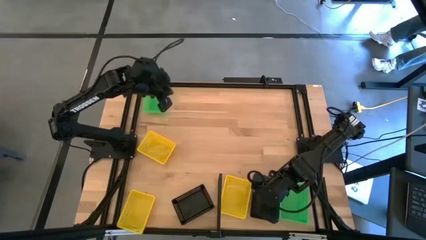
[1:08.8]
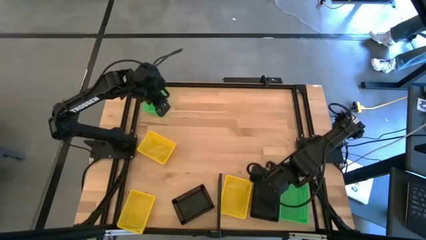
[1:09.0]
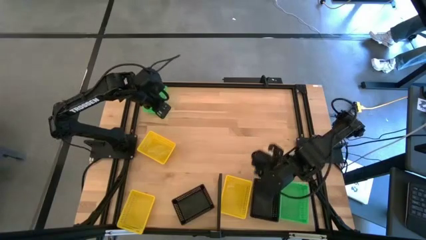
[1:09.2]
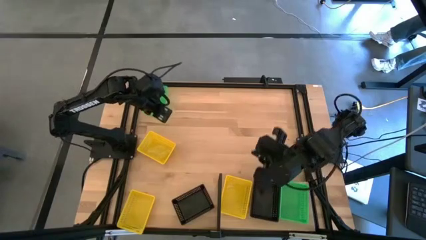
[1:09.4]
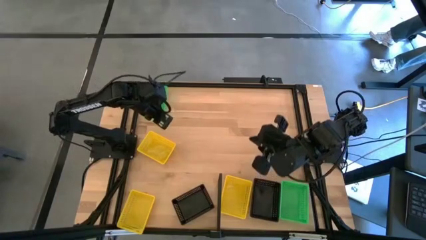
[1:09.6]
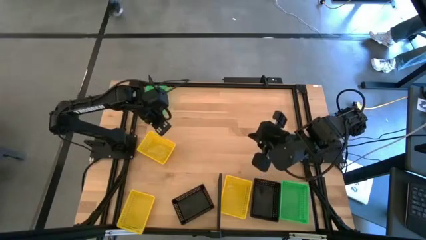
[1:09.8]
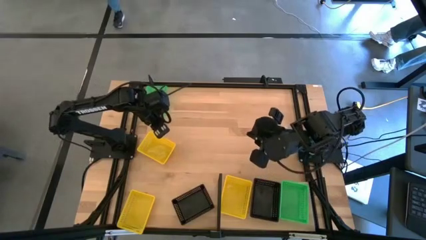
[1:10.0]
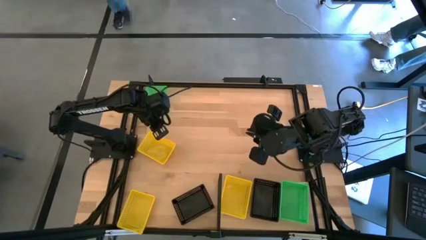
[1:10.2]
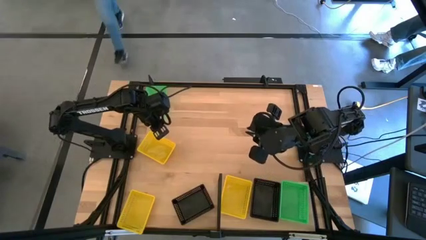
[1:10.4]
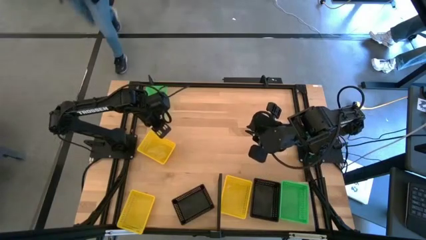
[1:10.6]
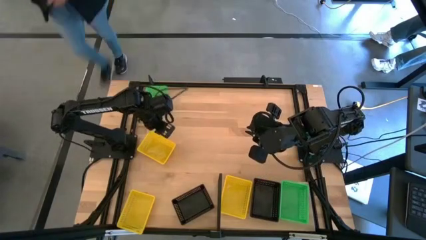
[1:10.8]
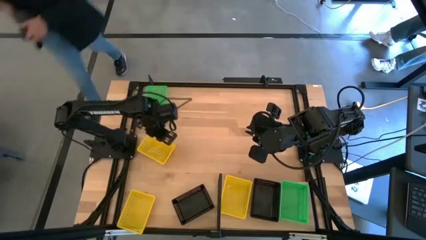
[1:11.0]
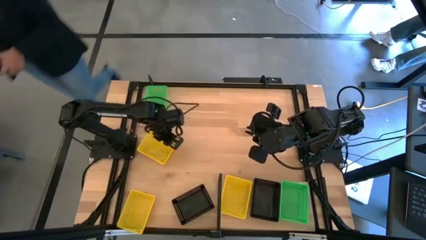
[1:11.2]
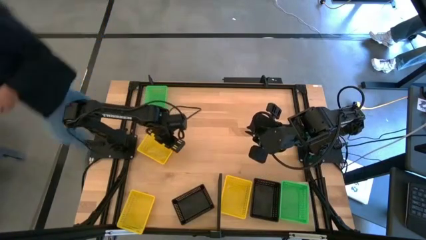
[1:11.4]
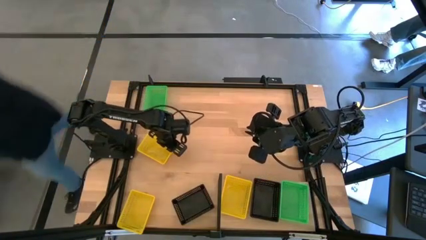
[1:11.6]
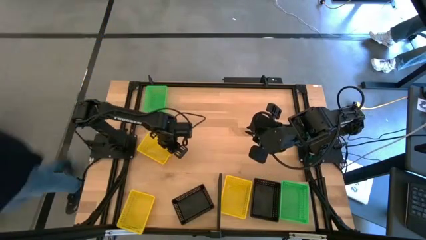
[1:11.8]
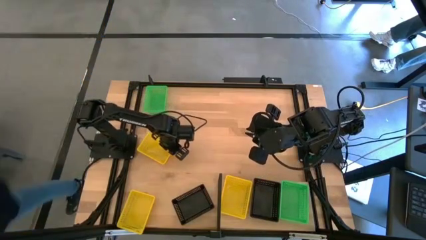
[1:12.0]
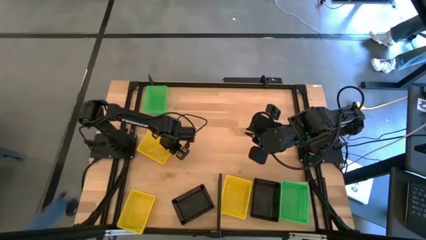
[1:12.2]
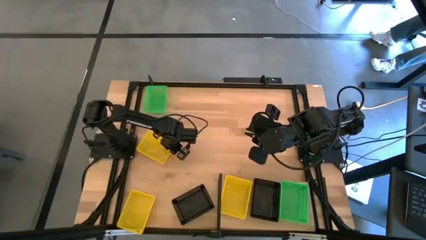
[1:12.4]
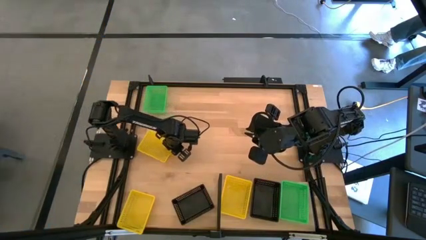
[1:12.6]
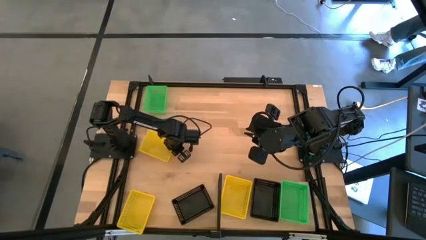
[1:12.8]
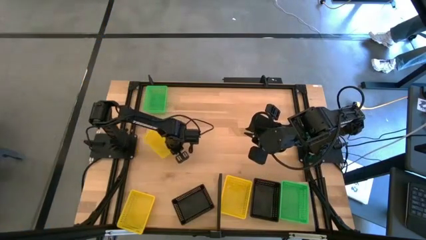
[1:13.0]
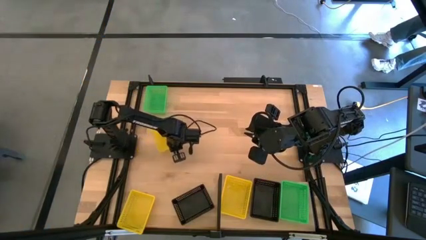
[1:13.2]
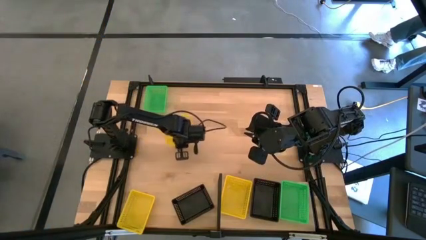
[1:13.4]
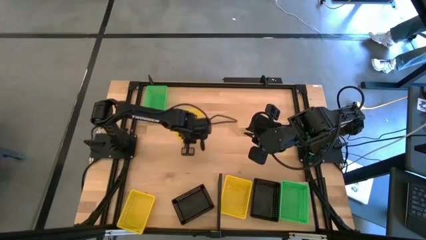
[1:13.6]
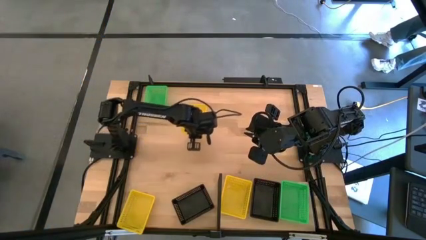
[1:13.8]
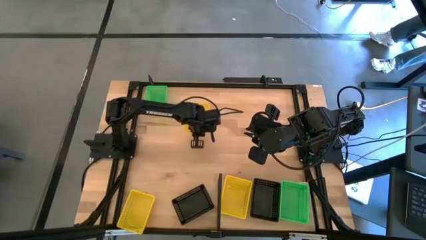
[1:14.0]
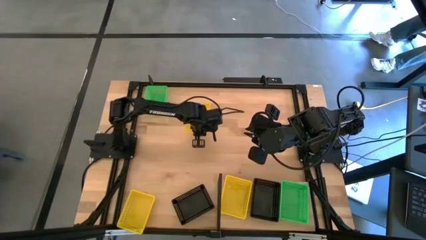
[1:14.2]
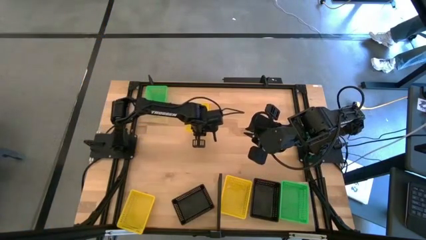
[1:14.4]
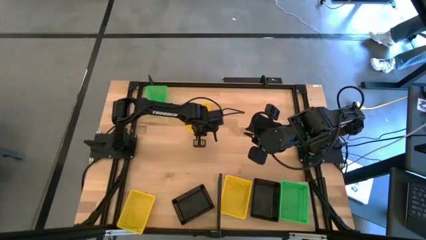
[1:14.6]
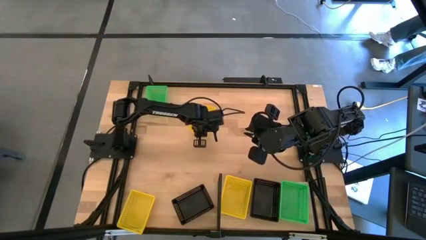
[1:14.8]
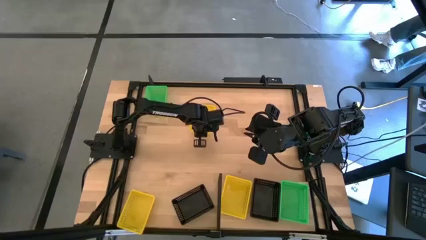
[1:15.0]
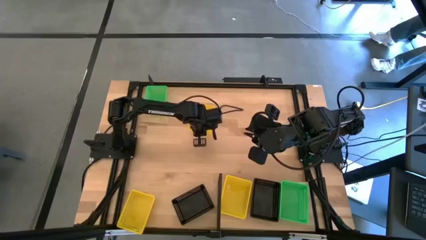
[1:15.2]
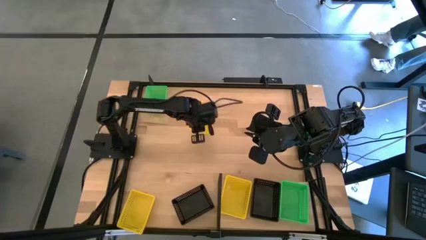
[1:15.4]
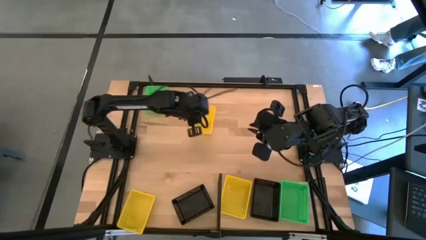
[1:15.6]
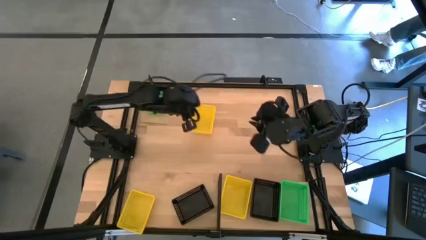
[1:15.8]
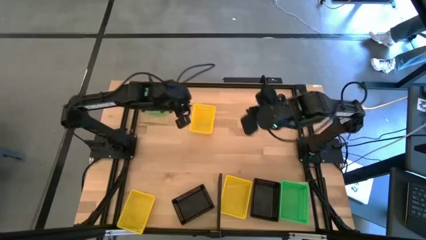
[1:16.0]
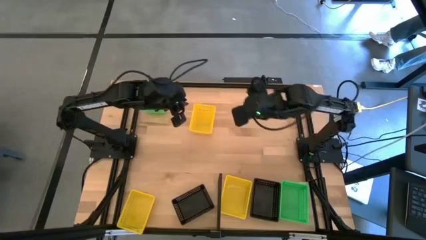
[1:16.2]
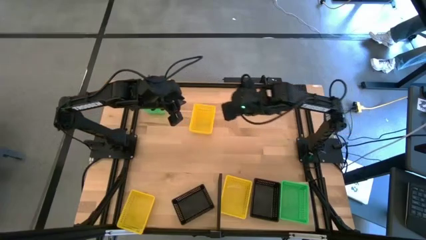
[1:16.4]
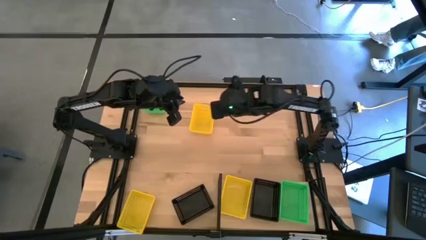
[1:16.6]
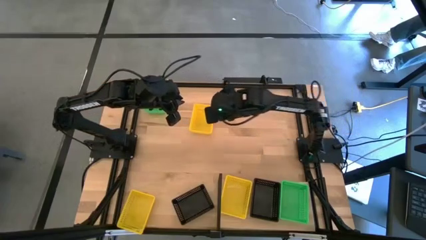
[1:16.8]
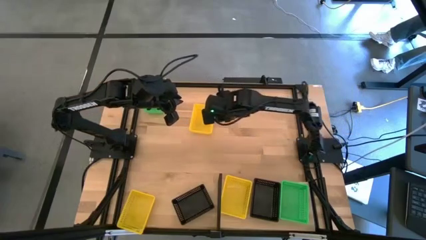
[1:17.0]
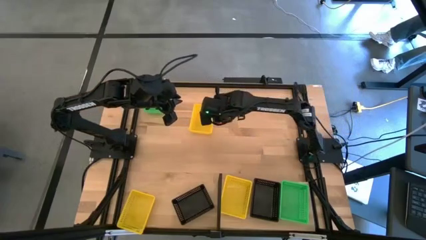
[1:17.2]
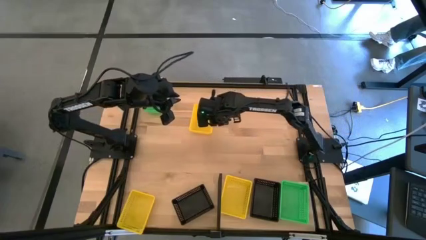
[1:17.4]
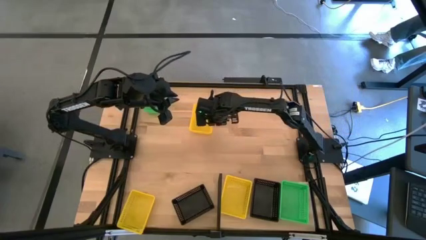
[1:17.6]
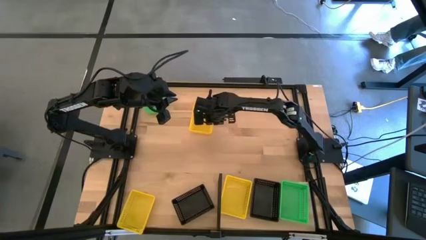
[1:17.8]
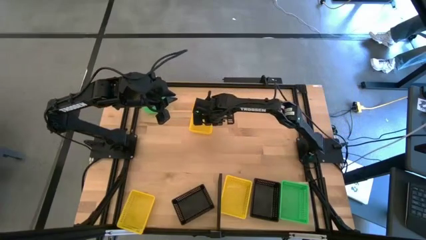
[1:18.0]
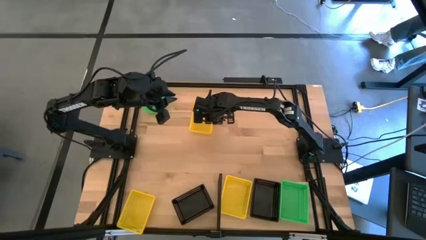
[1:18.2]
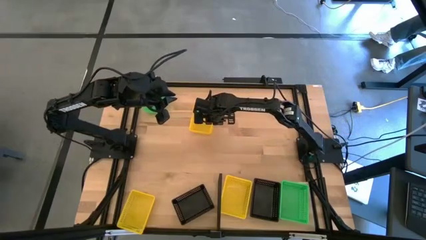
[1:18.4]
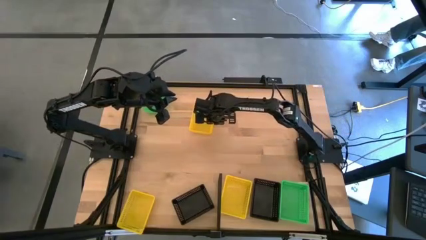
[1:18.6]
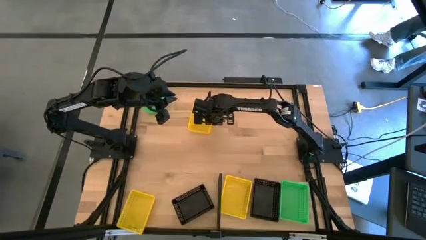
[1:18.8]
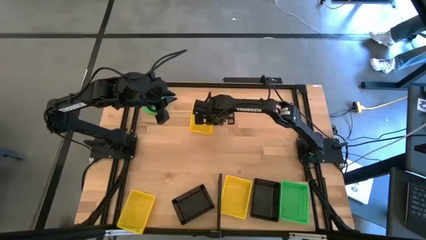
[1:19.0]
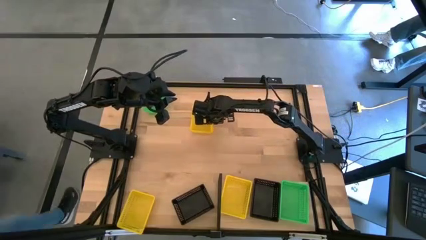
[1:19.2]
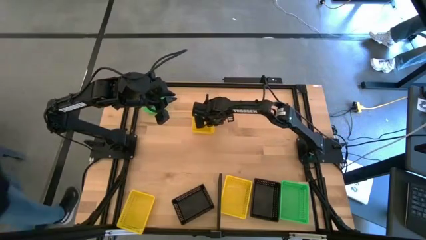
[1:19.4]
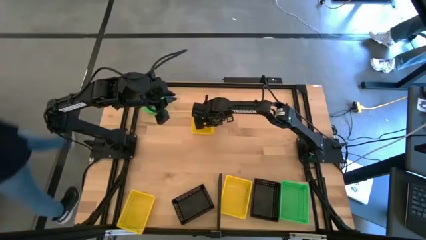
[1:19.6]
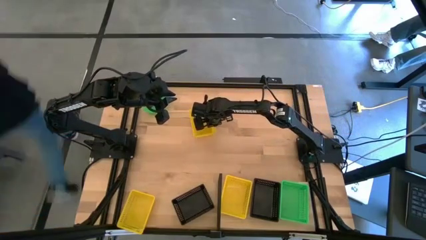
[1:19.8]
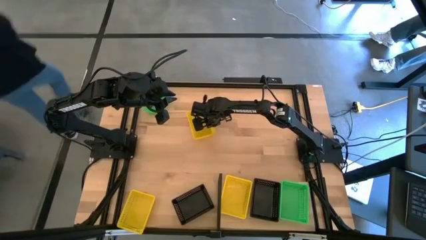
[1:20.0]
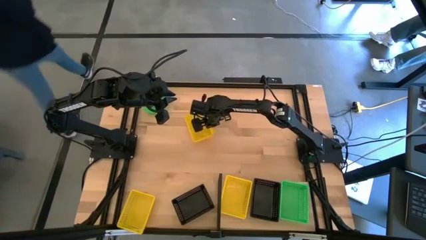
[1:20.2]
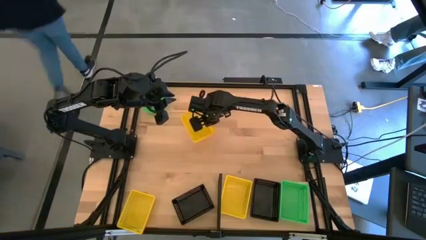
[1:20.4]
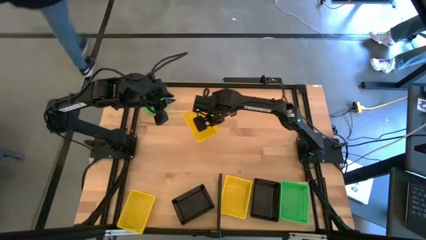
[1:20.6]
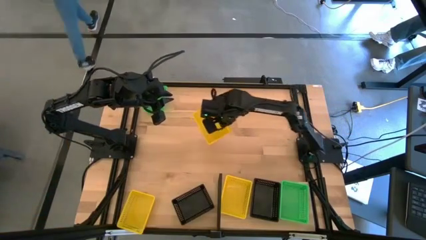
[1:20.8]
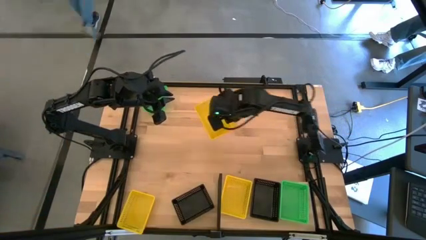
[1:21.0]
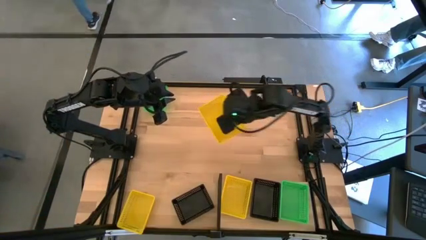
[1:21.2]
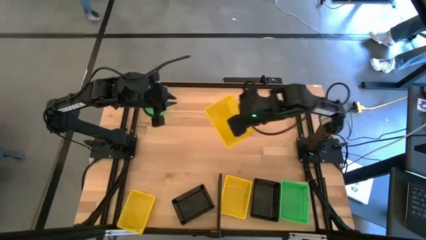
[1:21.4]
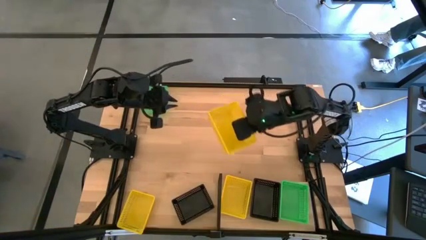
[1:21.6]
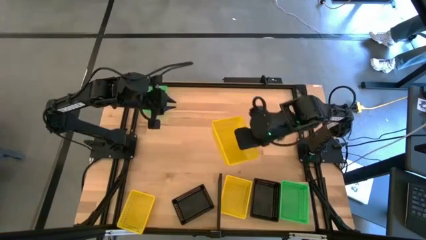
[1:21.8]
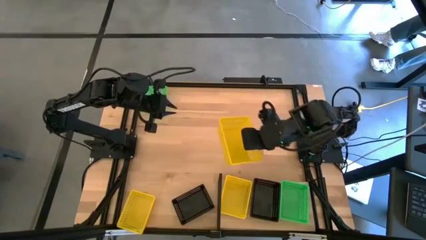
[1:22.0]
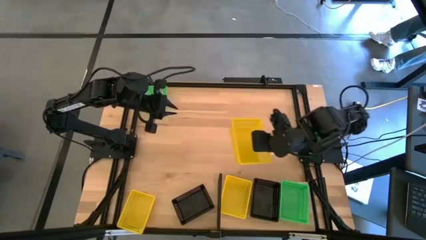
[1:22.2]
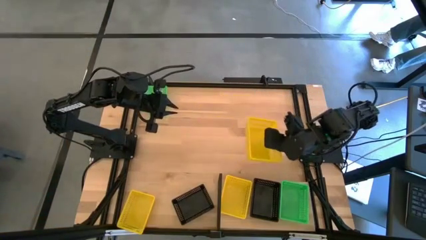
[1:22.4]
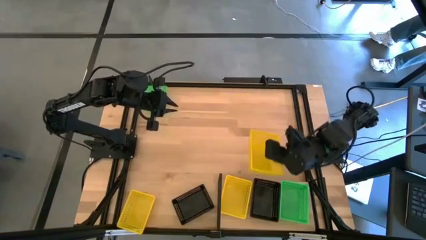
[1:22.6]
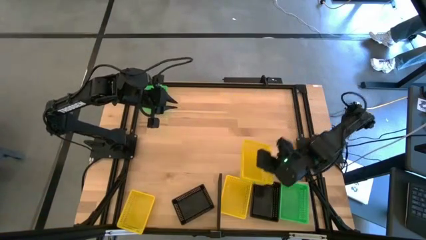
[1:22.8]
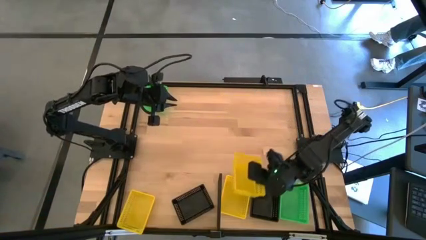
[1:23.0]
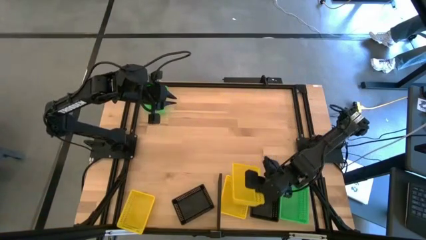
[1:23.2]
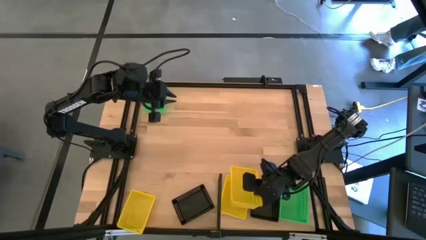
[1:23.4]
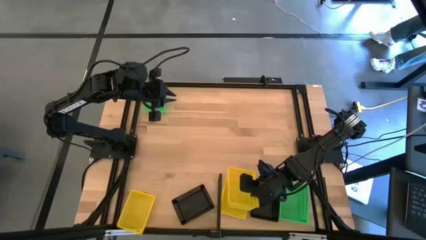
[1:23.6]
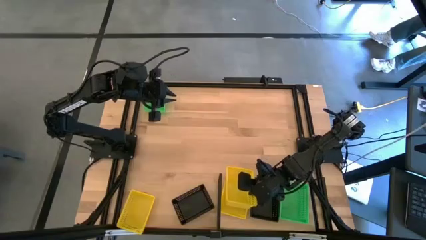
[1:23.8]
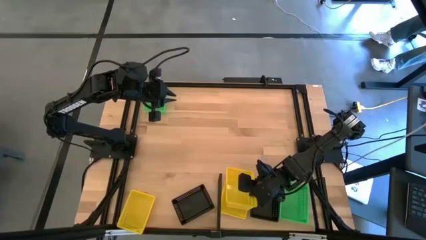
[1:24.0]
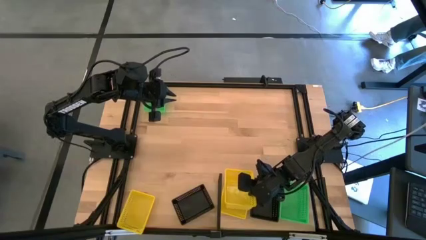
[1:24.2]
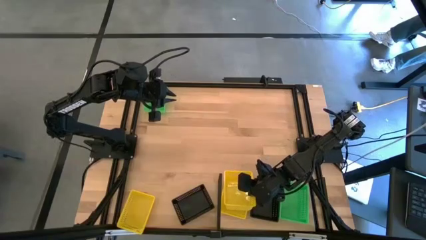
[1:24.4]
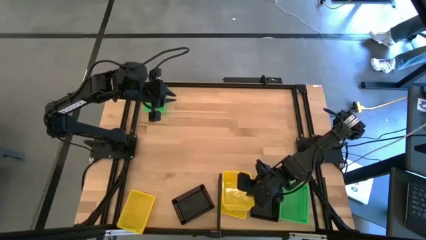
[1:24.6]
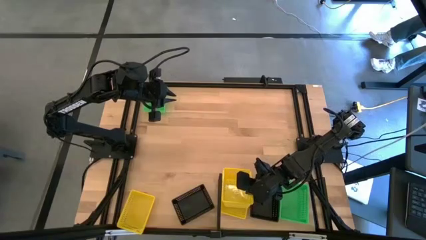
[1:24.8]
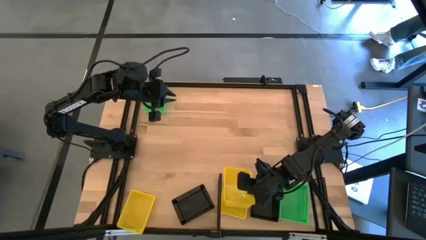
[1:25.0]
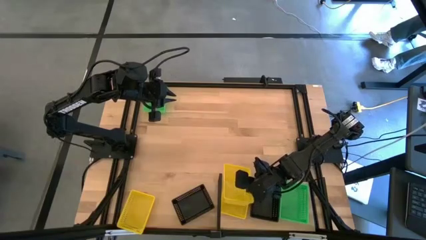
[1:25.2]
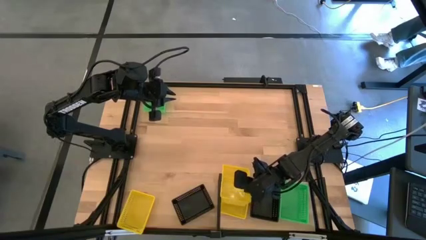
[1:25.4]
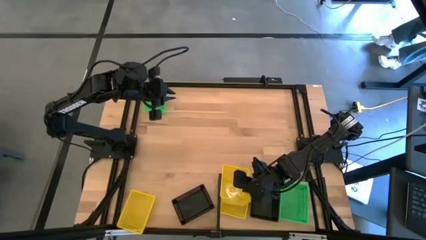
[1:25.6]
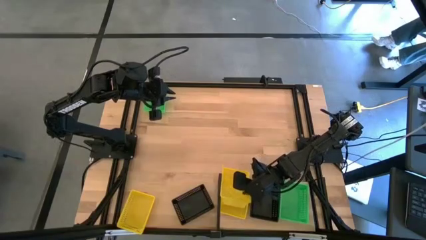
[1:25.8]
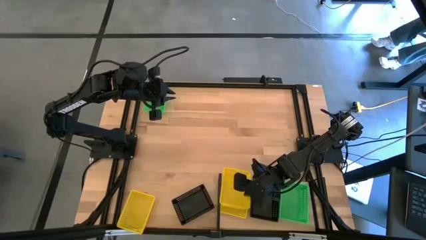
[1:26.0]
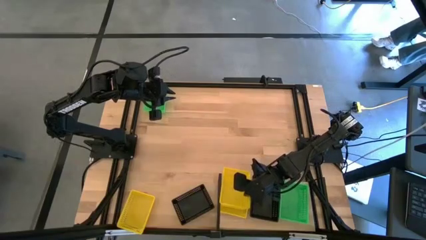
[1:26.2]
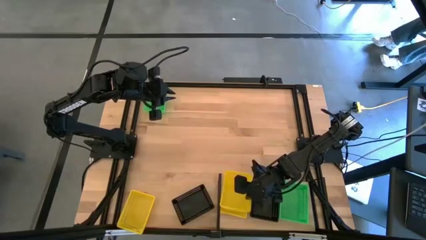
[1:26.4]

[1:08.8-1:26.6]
Task: Stack baskets on shelf by color
Stack the top yellow bin on top of the yellow bin on the shelf
